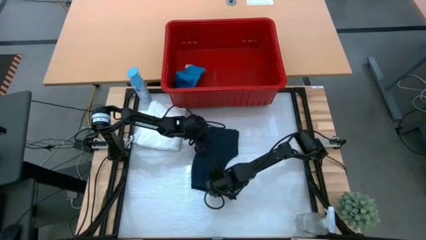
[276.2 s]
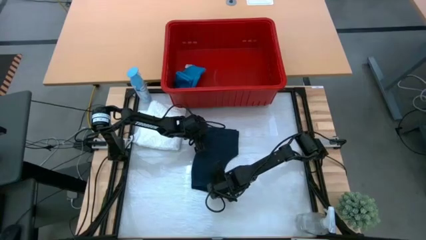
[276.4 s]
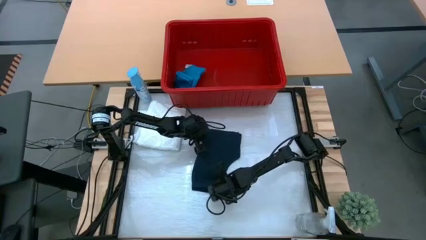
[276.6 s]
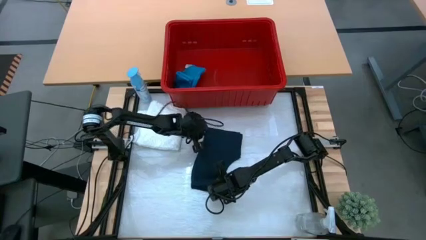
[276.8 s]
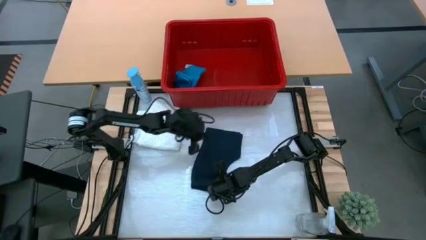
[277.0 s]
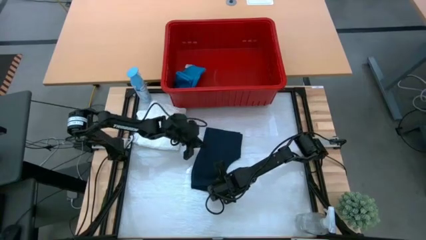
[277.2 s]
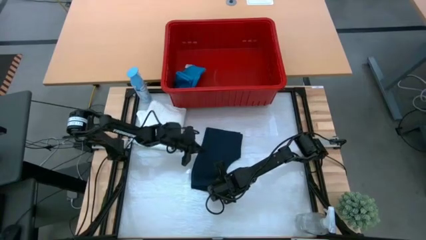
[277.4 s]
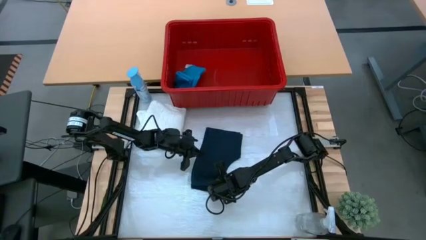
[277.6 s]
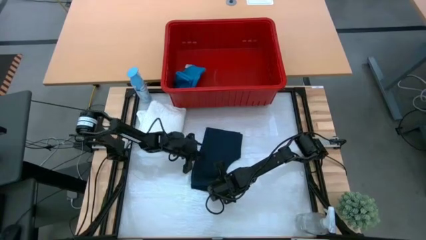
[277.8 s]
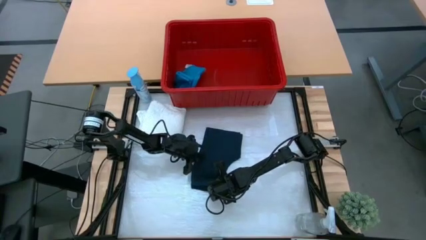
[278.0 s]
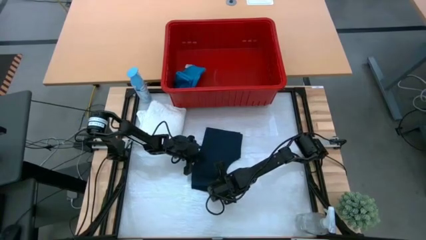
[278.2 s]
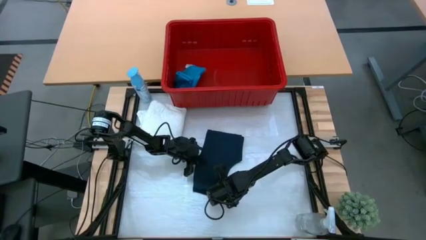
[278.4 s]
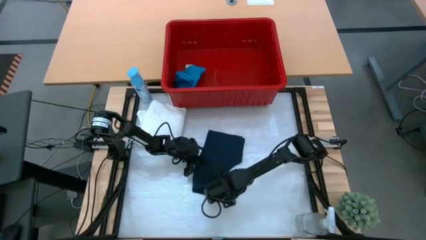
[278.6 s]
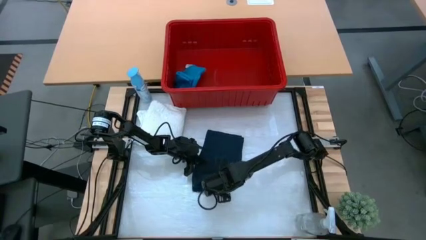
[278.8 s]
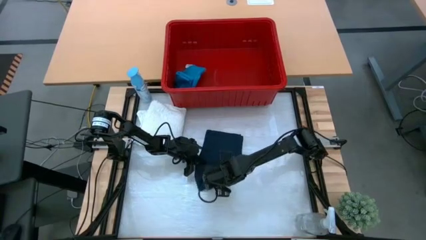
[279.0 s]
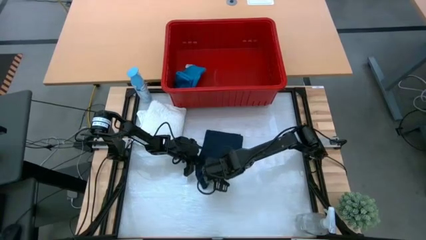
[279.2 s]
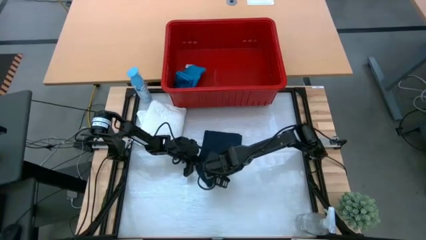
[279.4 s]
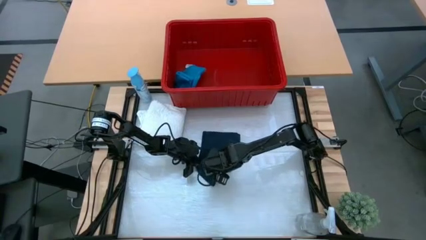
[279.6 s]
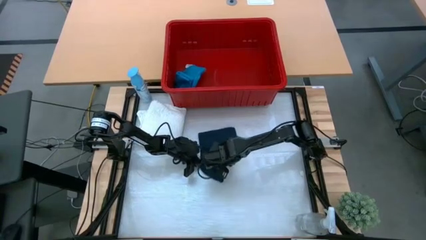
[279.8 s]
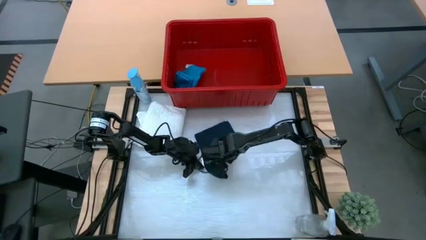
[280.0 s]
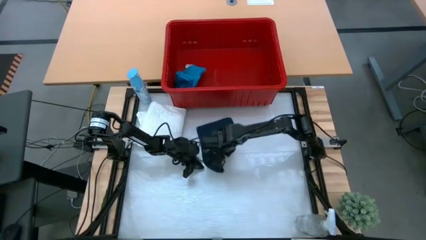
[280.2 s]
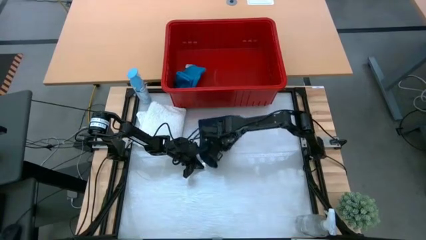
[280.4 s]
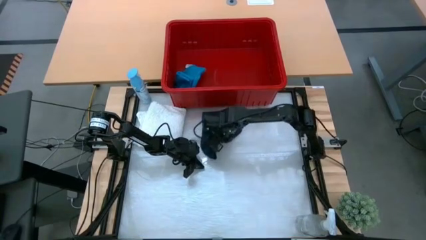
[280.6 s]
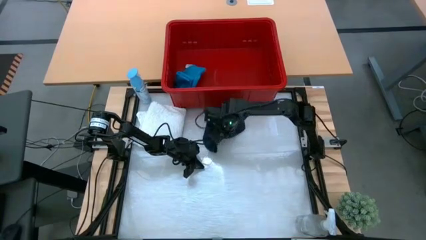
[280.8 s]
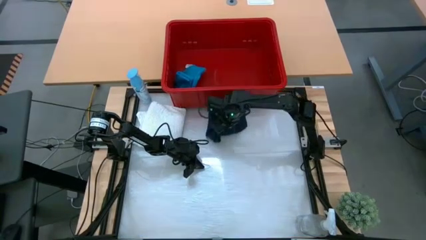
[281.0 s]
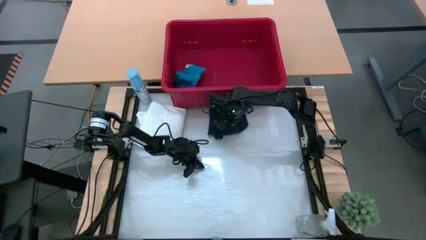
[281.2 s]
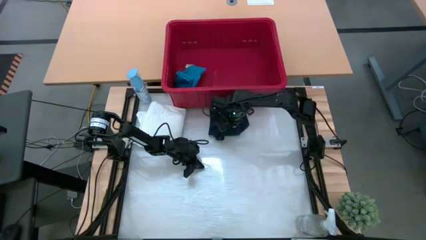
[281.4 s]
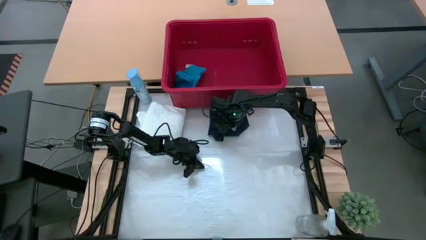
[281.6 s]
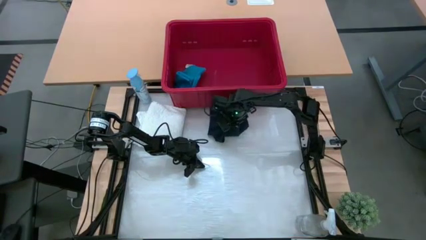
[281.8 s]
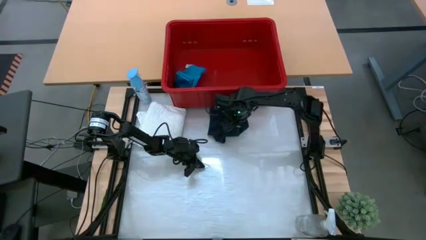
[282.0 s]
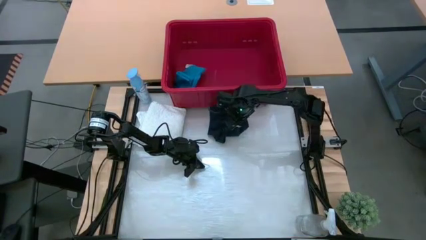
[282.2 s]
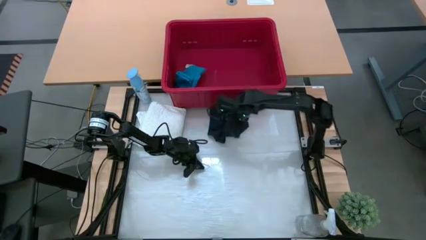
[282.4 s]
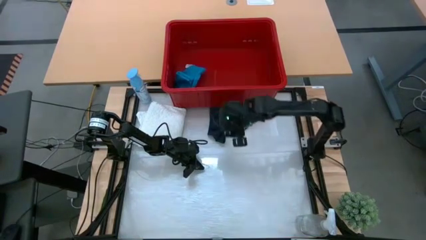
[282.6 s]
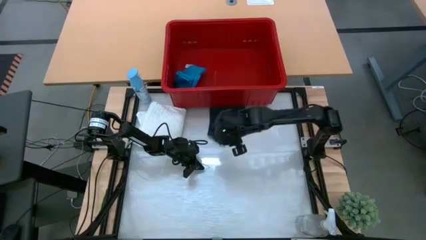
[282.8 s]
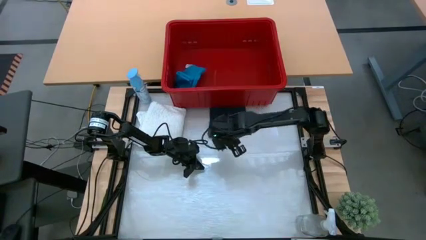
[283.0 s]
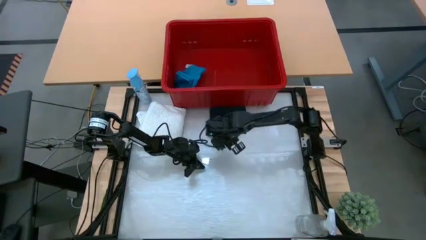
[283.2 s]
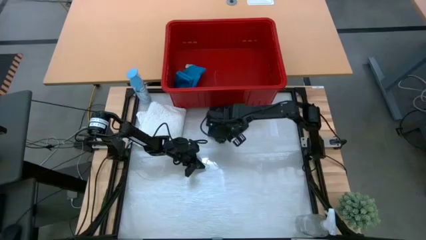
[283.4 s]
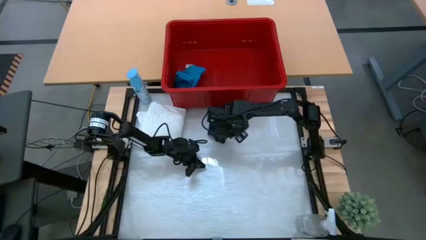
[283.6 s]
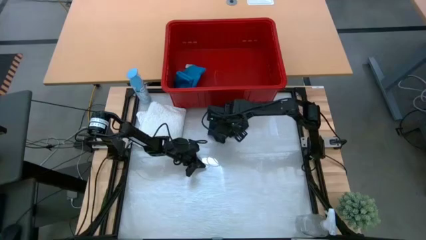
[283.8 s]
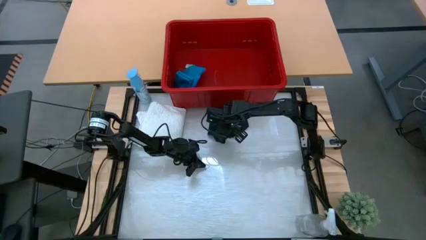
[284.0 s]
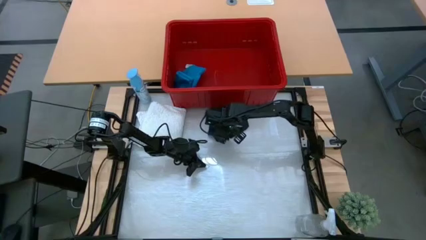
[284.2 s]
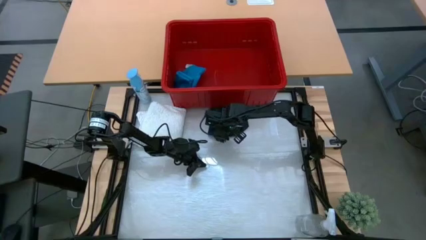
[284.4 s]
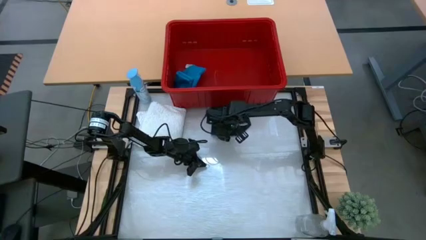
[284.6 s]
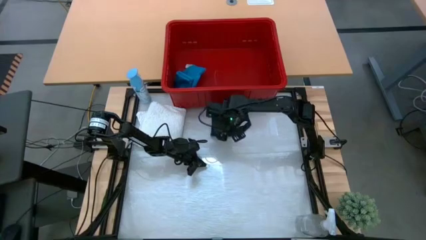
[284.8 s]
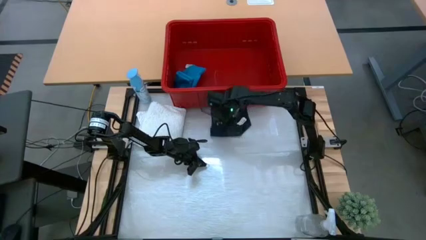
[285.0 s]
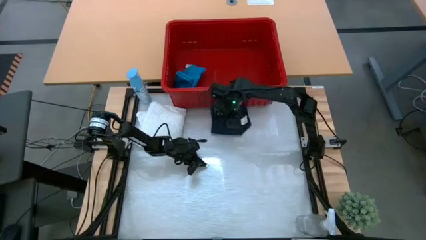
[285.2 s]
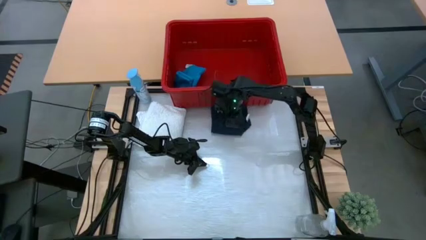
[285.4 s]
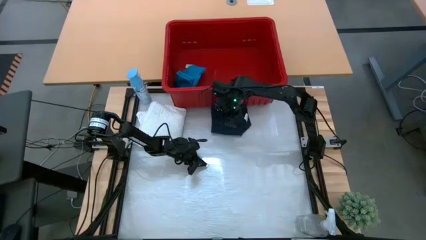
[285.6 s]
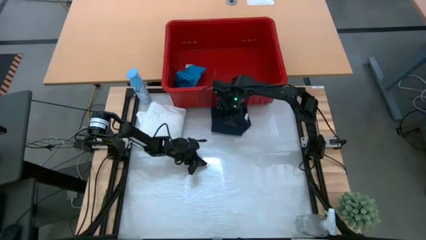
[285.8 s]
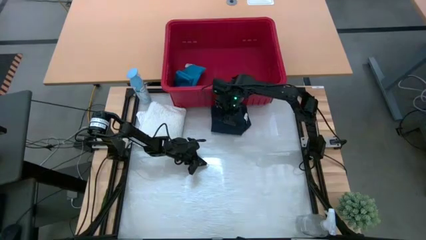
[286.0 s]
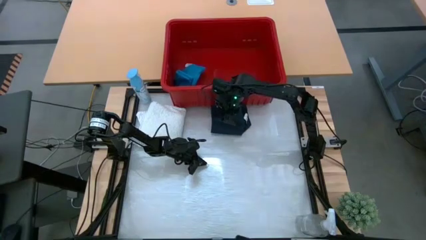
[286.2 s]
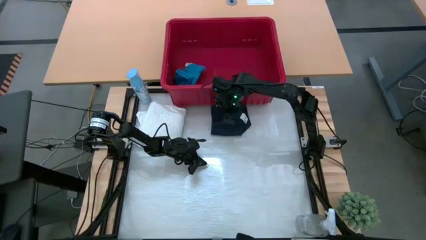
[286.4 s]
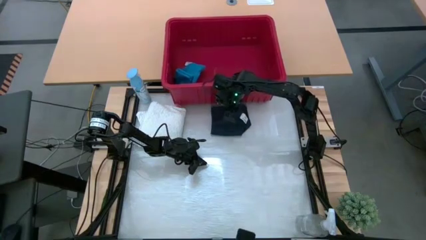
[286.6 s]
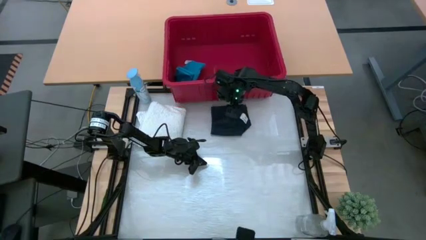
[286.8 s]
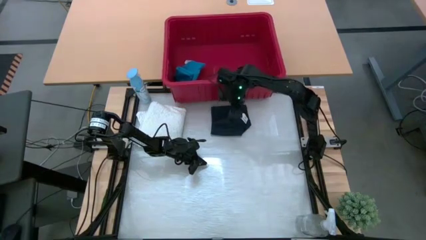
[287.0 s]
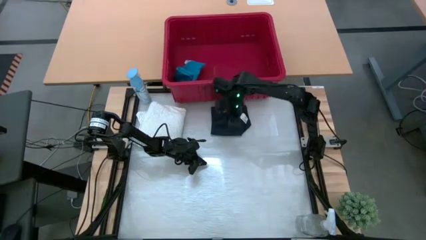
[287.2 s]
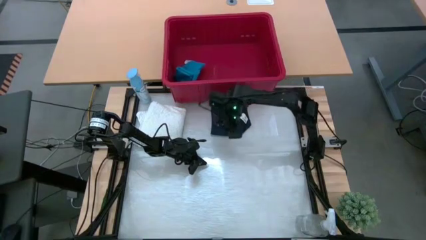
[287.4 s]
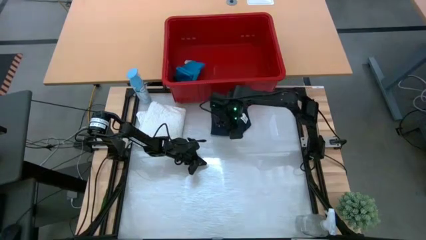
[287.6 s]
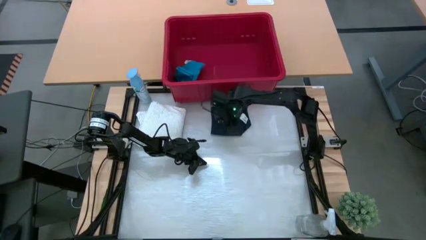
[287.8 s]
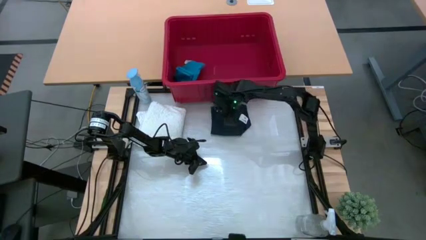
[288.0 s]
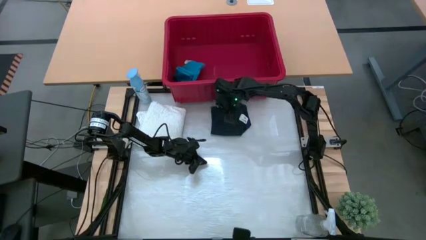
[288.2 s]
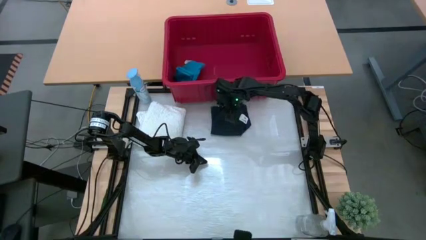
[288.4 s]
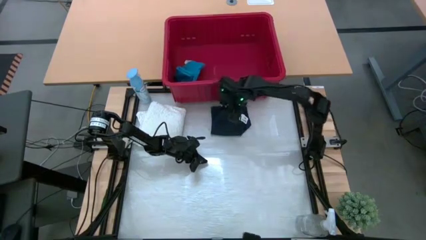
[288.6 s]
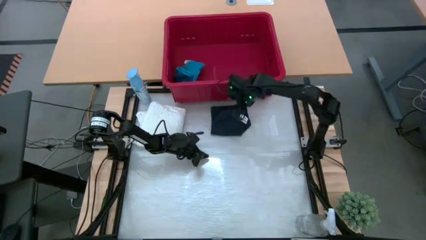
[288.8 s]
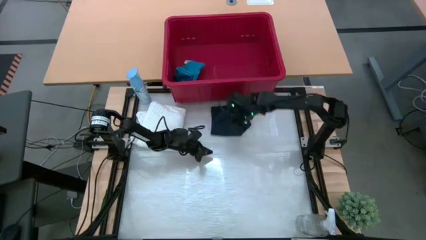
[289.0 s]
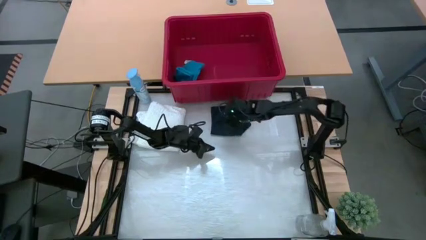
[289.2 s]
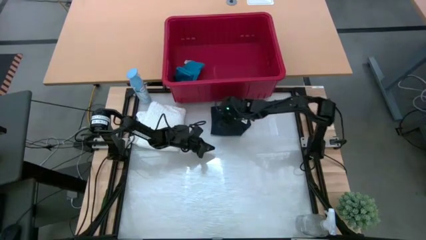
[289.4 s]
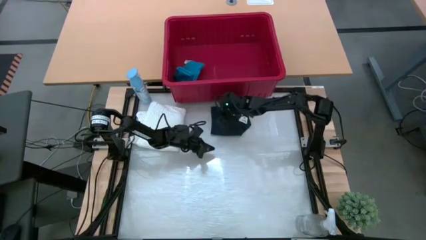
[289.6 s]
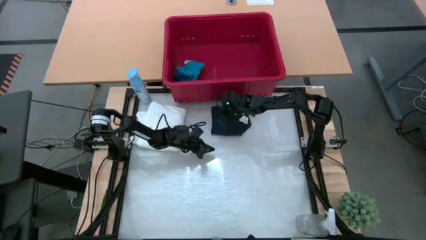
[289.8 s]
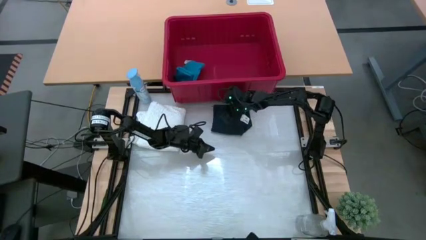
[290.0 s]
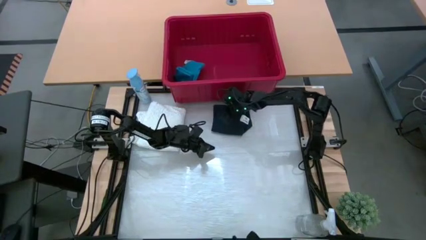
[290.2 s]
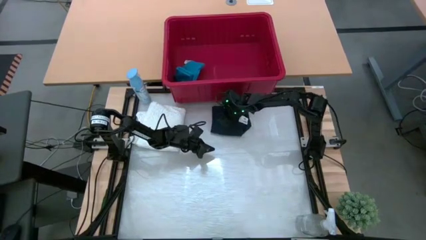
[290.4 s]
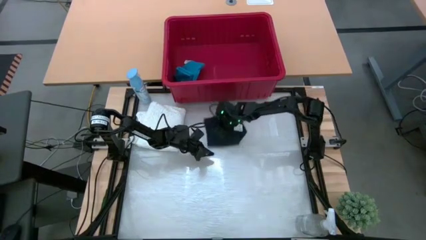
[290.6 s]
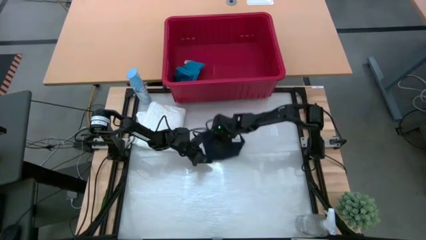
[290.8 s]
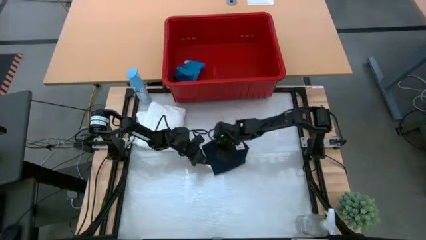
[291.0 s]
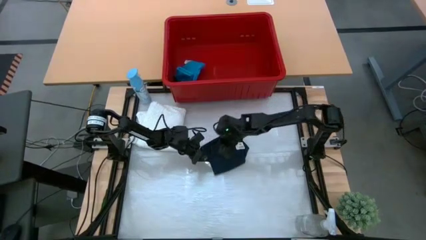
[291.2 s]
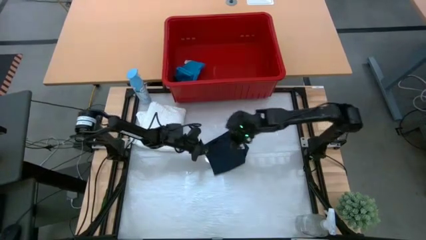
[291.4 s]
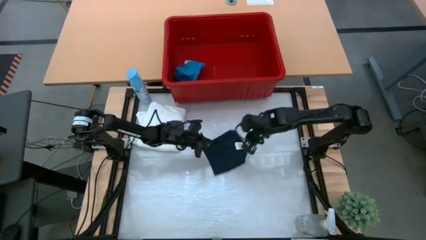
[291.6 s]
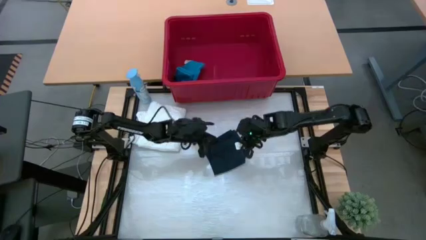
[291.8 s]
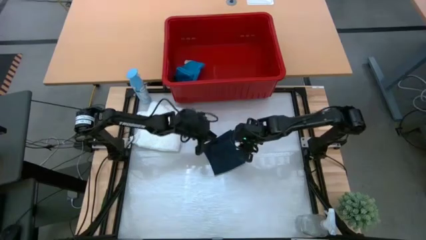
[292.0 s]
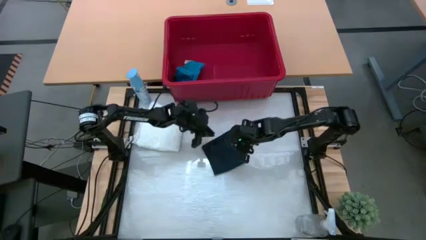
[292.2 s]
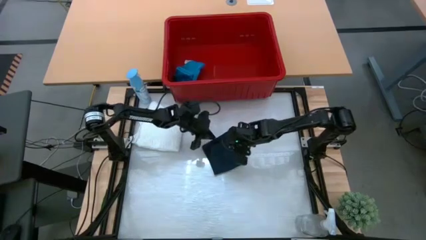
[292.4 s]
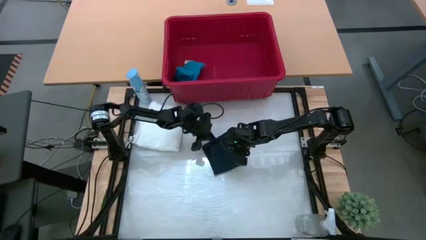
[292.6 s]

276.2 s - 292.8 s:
Task: Fold Laundry from Bin
Fold the black shorts
